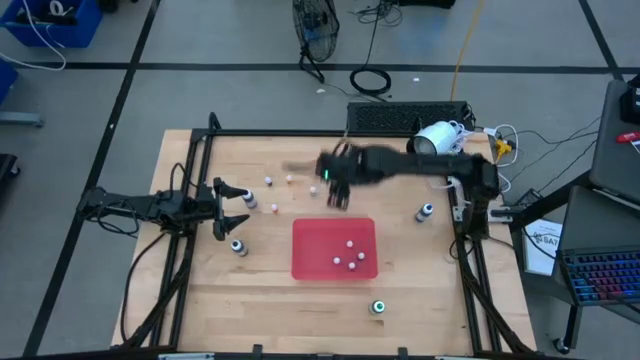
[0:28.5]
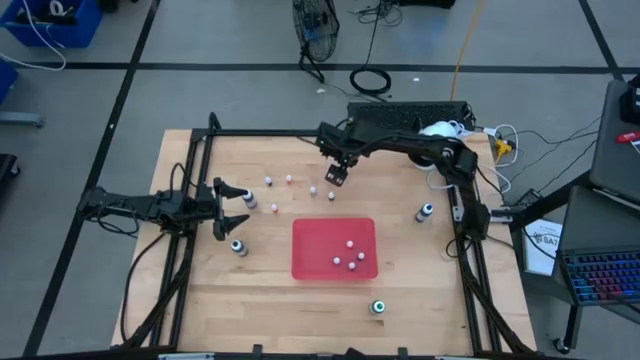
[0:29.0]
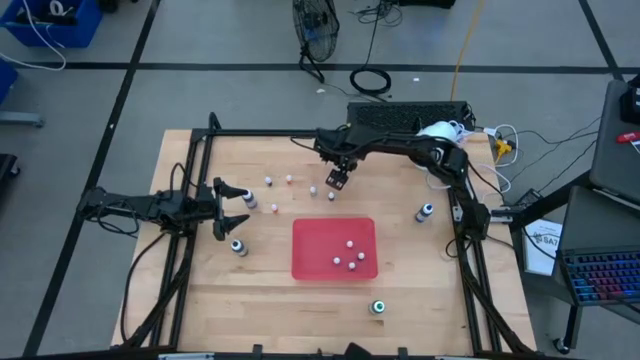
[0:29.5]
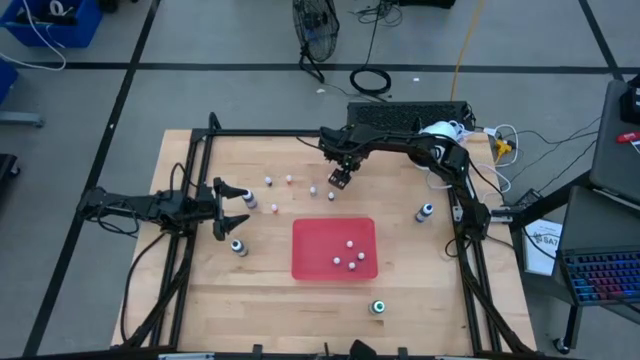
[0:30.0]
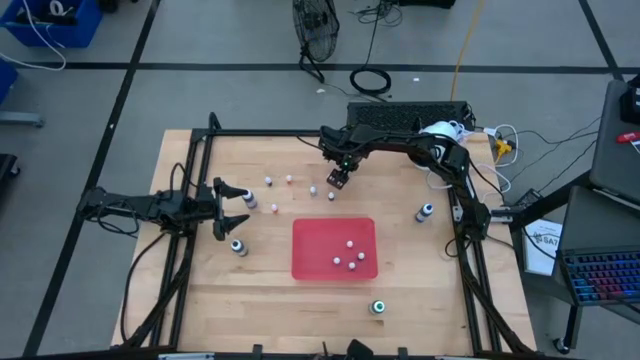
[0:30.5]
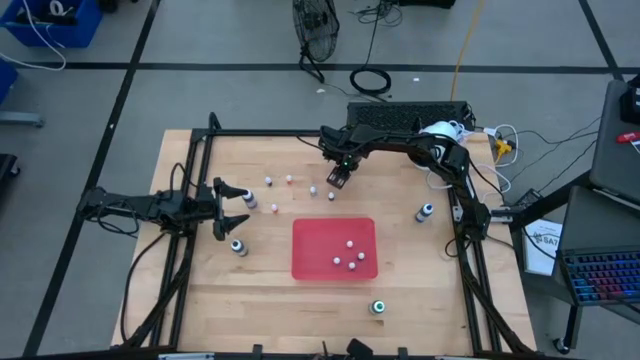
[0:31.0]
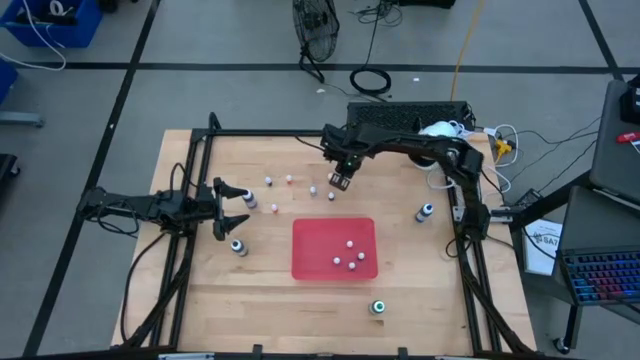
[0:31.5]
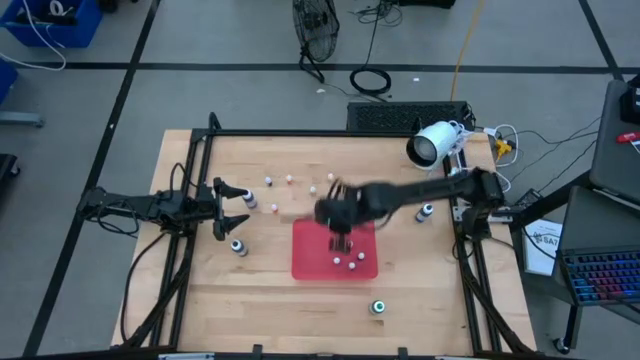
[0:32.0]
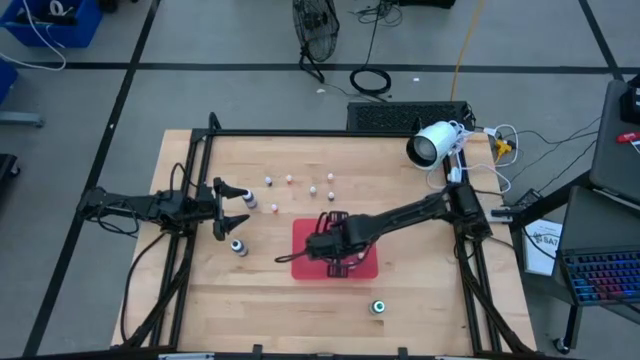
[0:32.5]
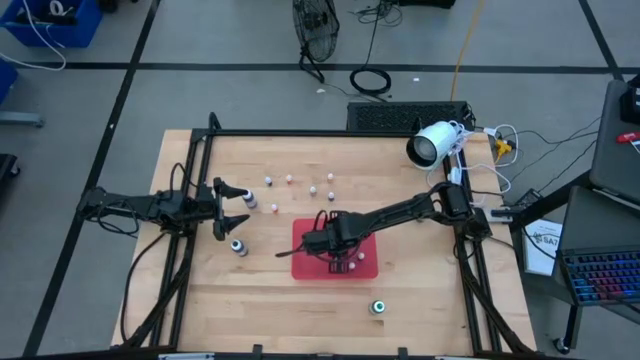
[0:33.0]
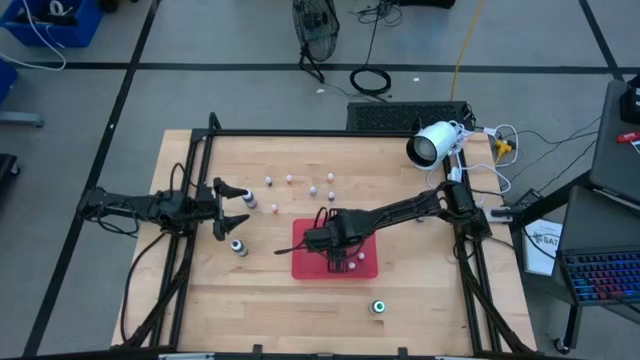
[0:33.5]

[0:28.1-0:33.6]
Task: Pick & Place food coloring
Put the small black food coloring bottle into the pink bin

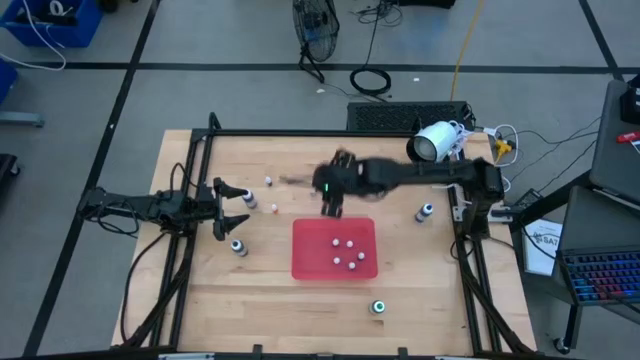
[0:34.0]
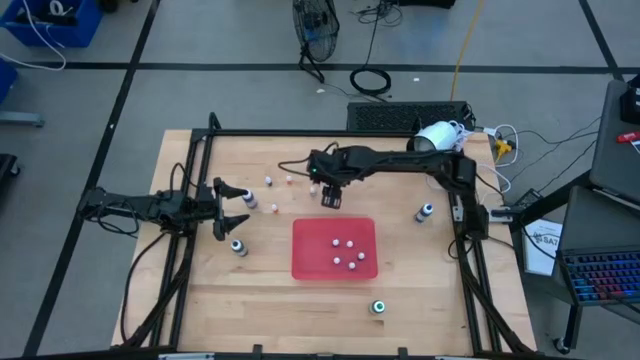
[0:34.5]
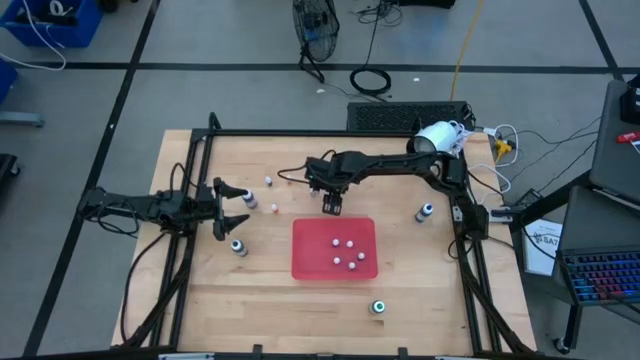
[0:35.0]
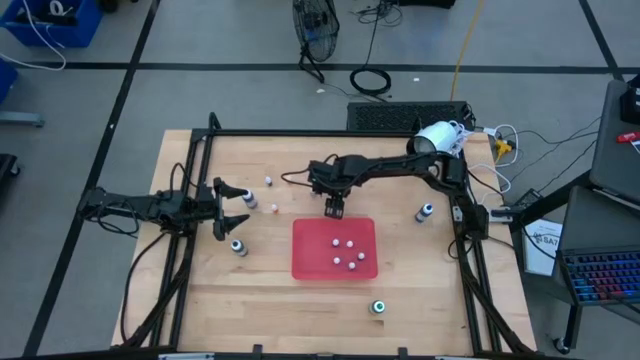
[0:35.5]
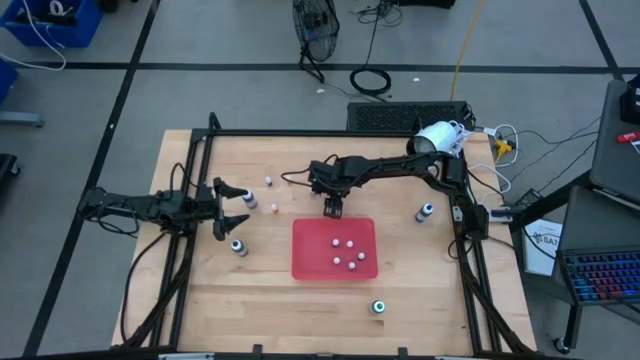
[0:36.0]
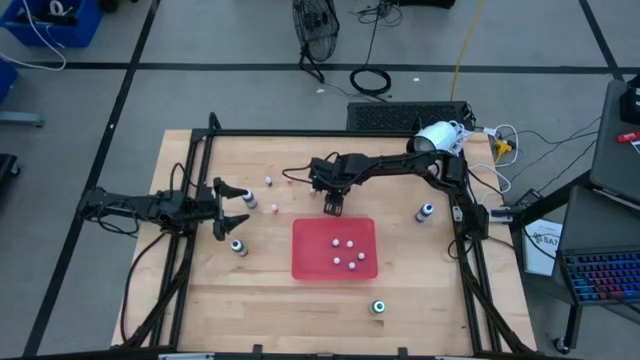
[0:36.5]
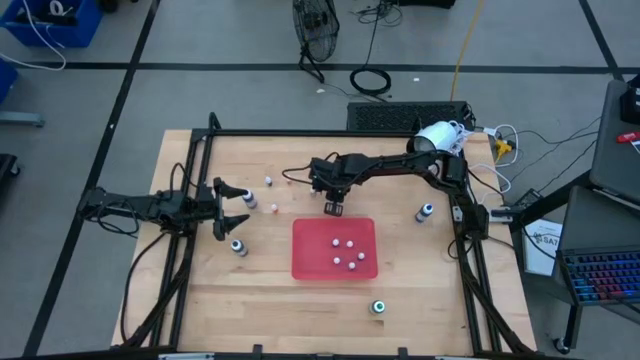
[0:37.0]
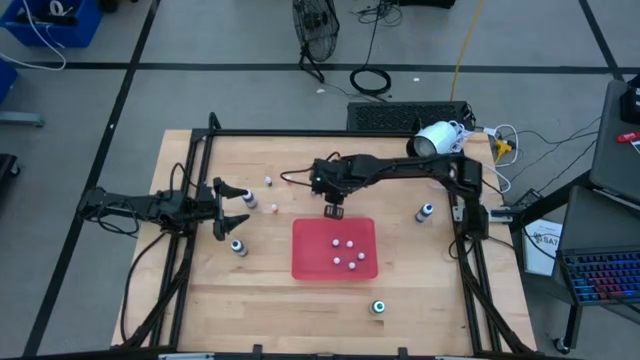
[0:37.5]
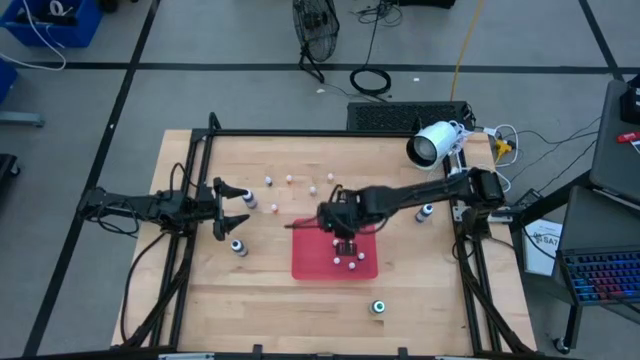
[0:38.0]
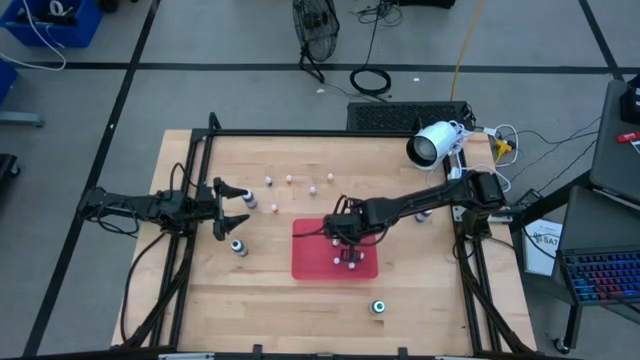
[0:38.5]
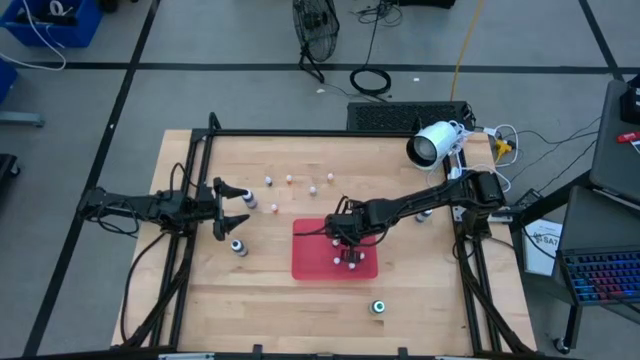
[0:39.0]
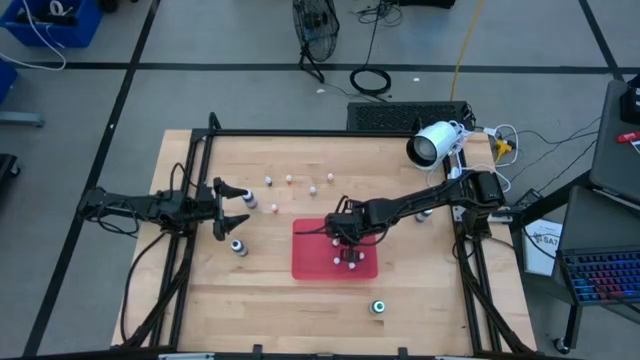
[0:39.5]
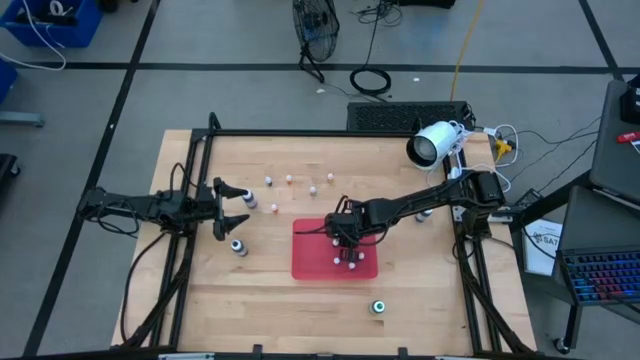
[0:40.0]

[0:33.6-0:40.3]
Put the small black food coloring bottle into the pink bin

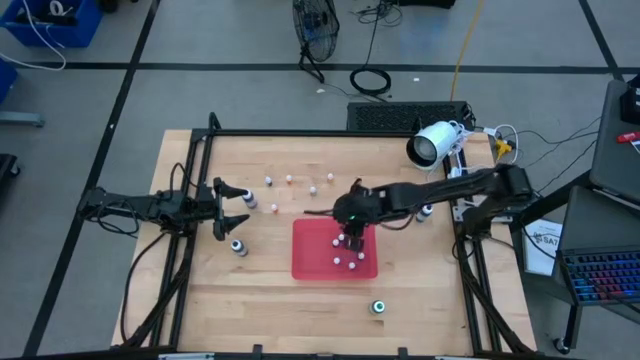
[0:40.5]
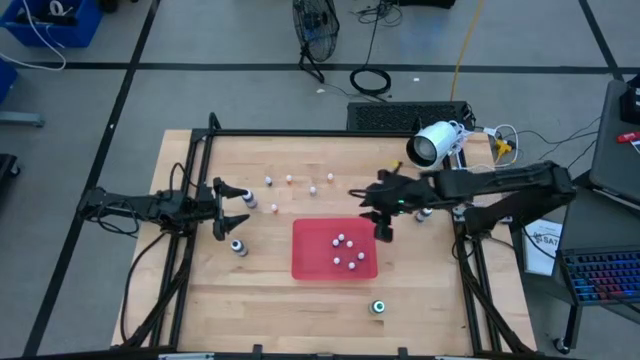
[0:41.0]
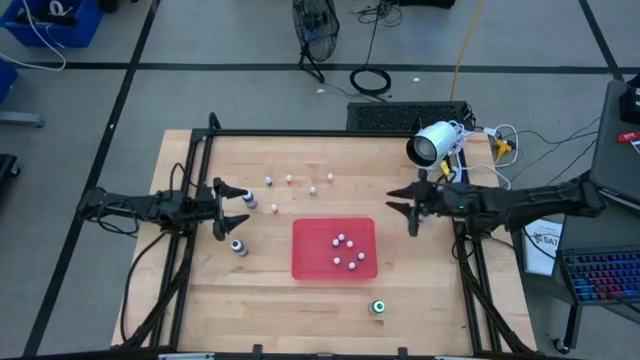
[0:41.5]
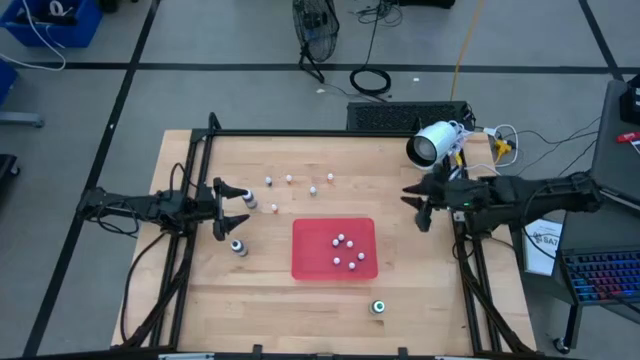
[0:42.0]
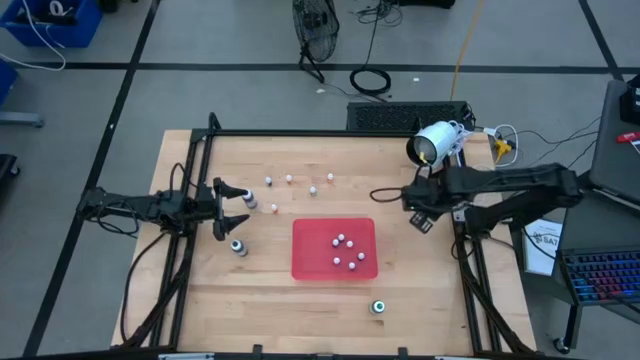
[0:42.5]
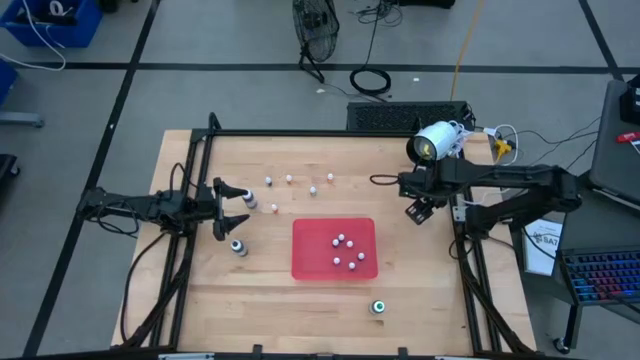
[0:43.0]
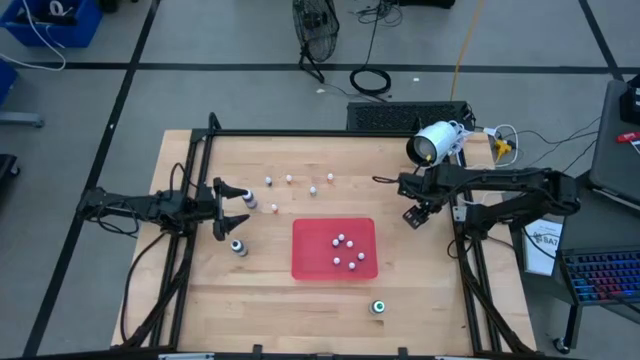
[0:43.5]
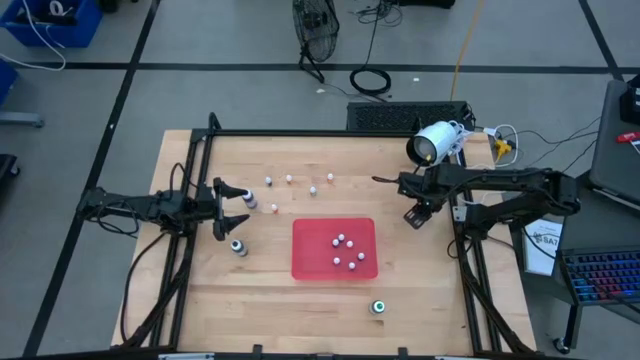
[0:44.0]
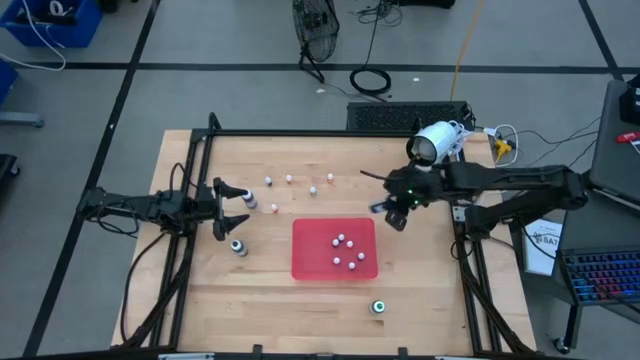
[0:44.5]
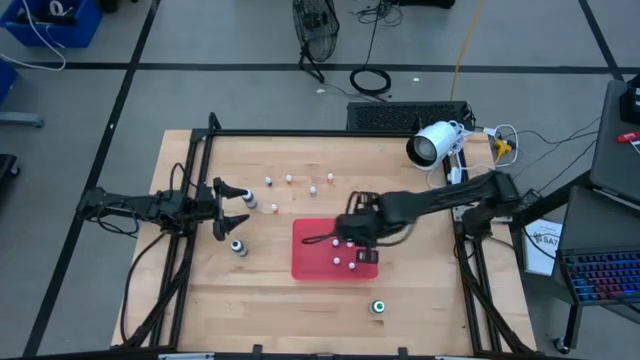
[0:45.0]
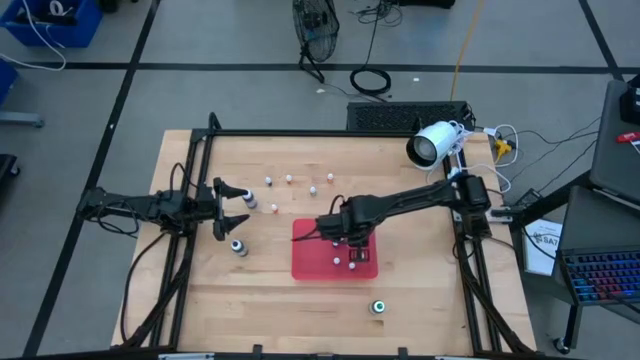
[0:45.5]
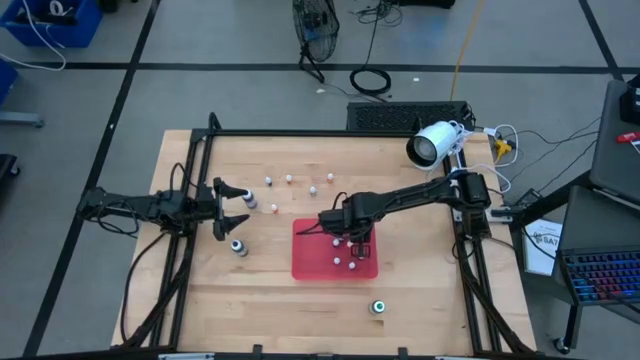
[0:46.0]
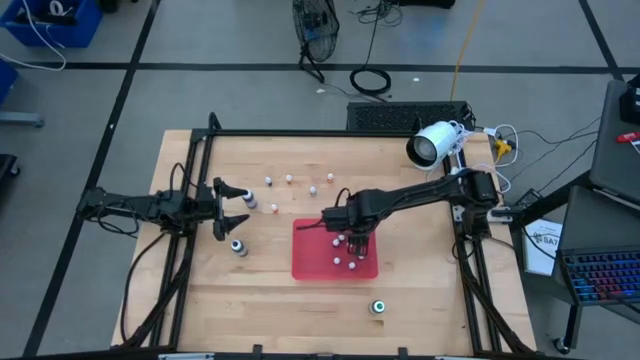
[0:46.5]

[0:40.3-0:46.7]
Put the large blue food coloring bottle into the pink bin

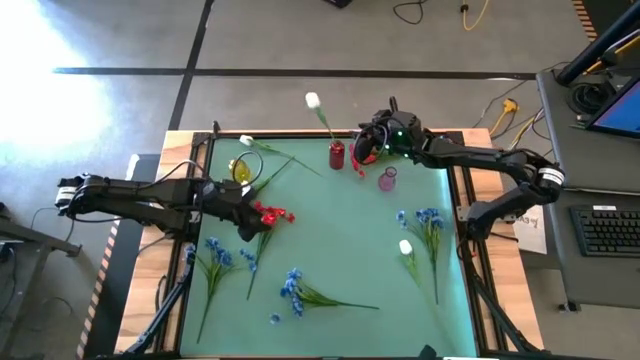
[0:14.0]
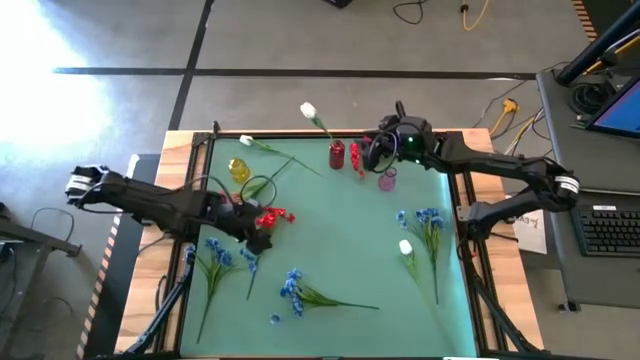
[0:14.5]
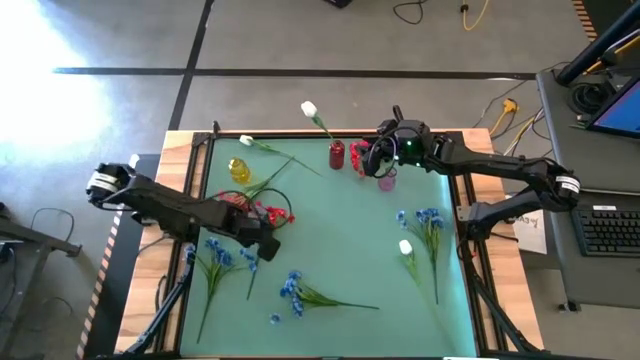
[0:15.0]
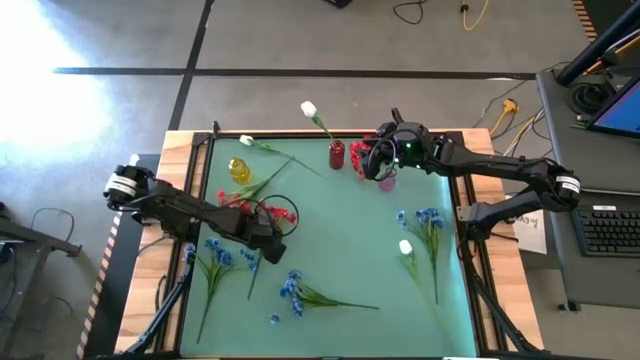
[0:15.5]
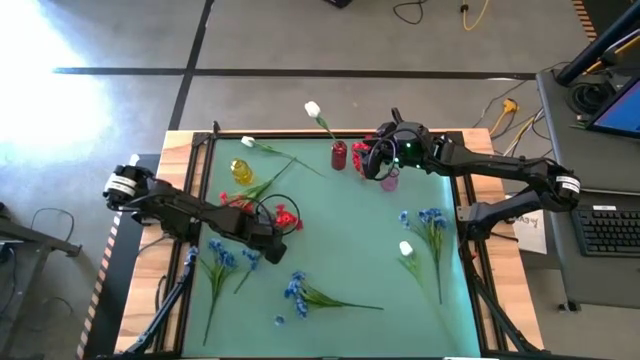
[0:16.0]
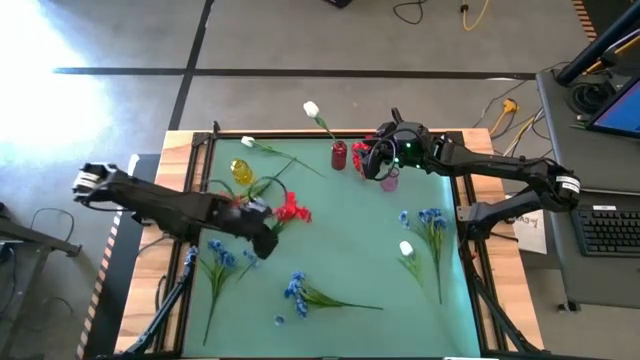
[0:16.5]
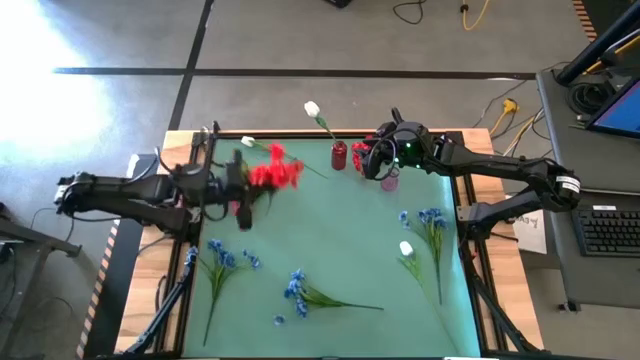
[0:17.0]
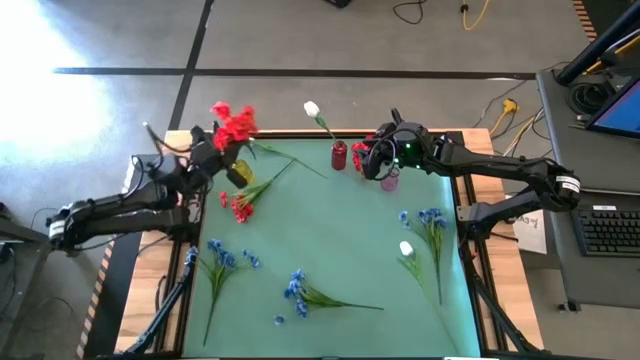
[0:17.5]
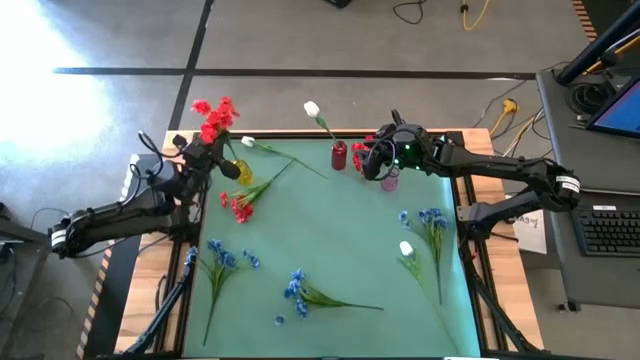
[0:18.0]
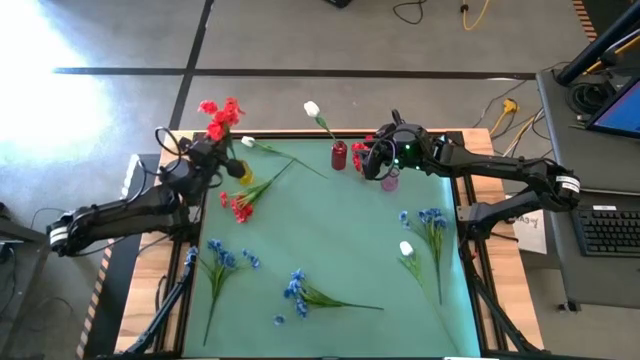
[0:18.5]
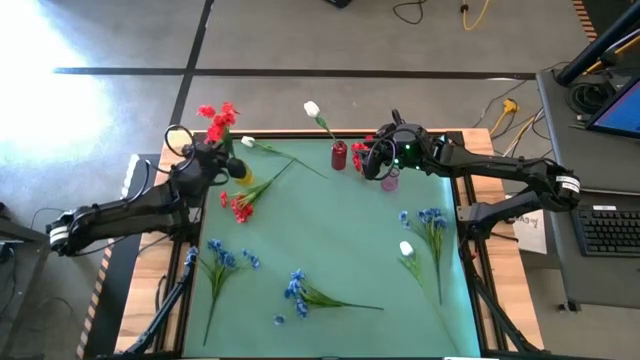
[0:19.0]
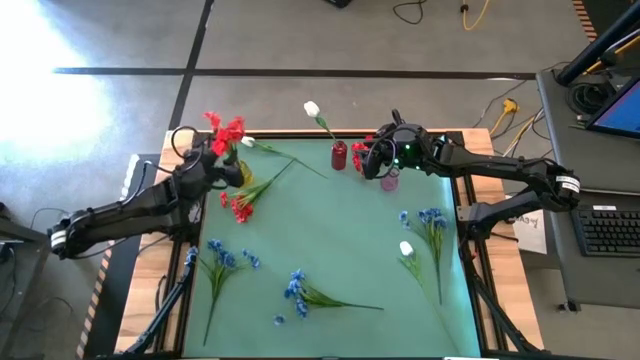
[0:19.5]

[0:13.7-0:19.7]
Task: Sort flowers into vase by color
Put the bottom red flower into the yellow vase
